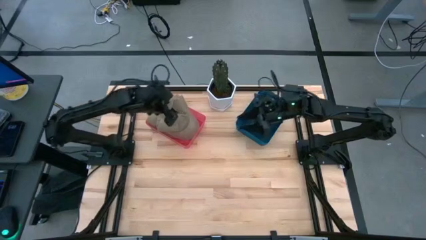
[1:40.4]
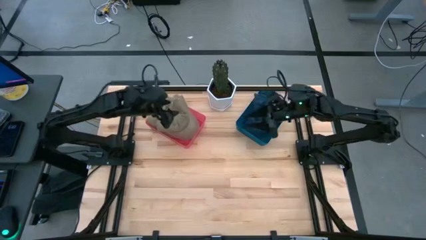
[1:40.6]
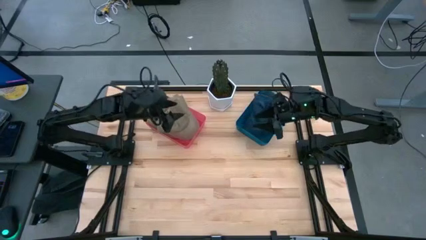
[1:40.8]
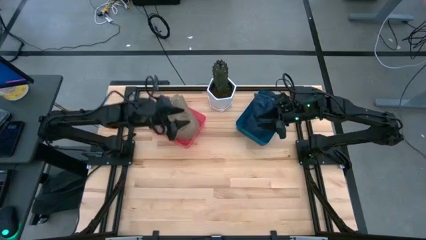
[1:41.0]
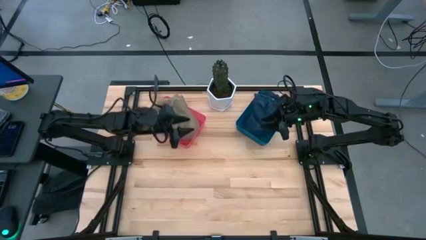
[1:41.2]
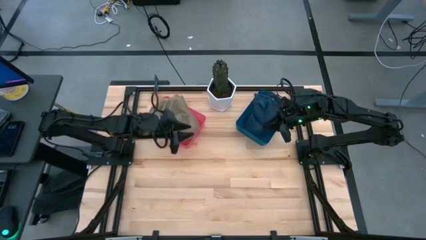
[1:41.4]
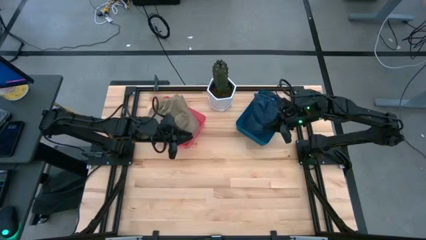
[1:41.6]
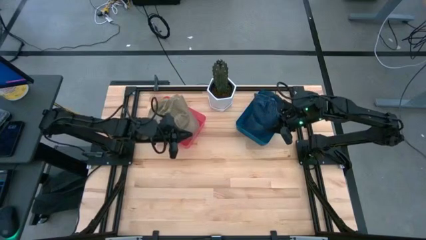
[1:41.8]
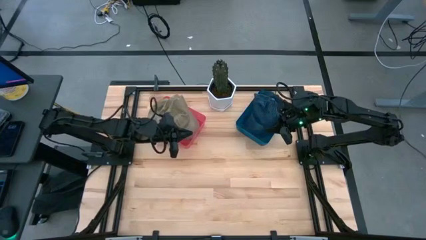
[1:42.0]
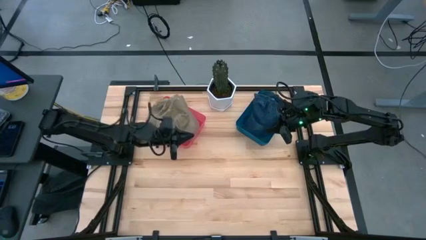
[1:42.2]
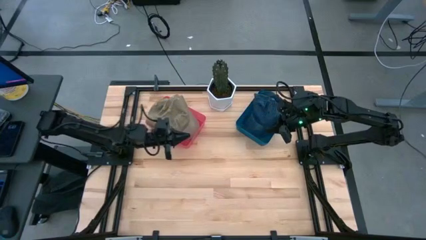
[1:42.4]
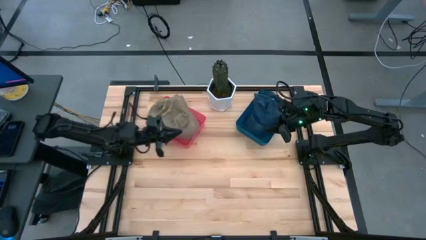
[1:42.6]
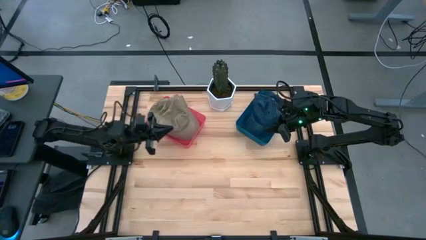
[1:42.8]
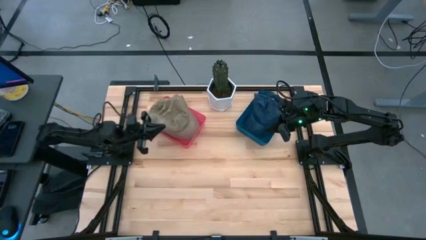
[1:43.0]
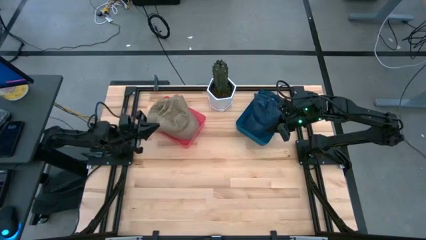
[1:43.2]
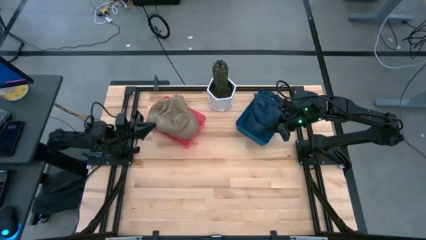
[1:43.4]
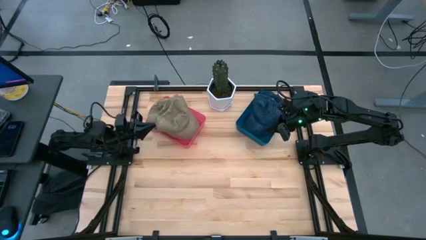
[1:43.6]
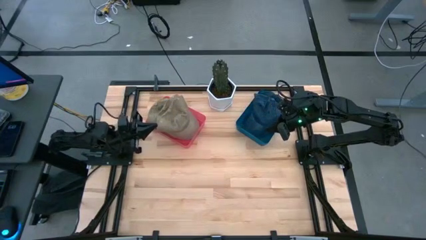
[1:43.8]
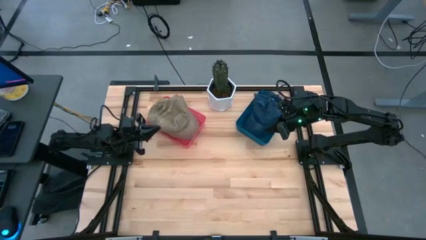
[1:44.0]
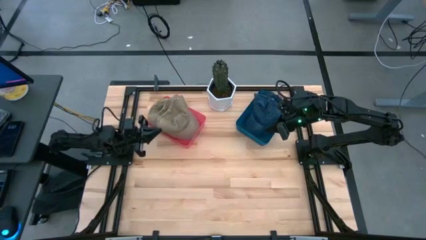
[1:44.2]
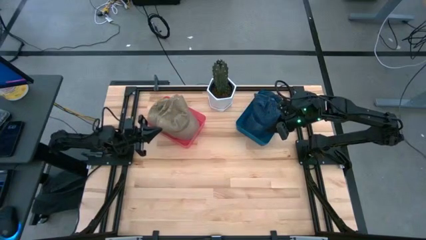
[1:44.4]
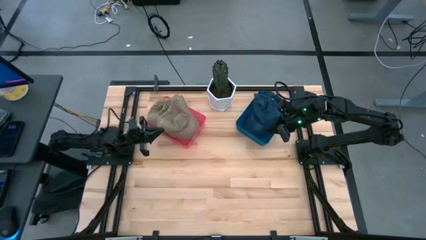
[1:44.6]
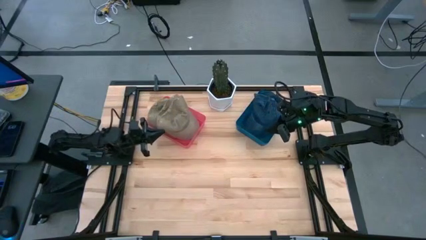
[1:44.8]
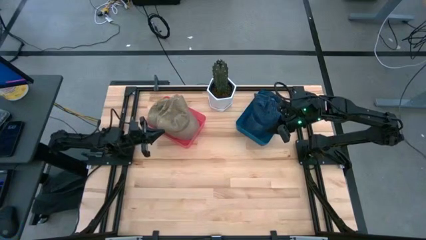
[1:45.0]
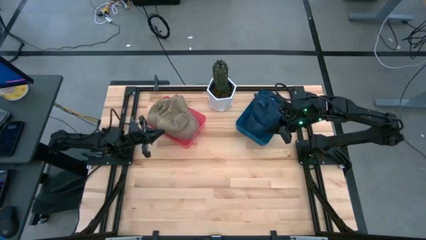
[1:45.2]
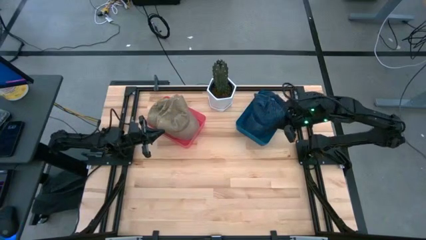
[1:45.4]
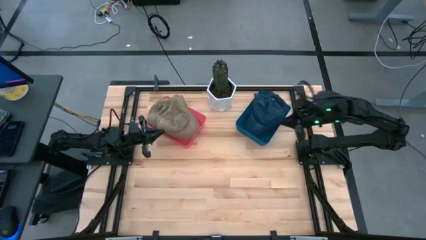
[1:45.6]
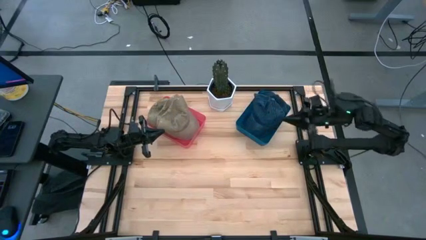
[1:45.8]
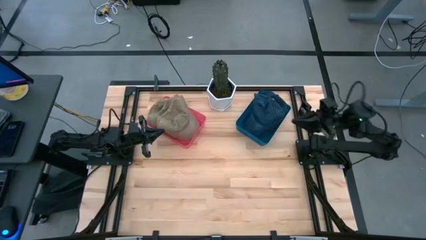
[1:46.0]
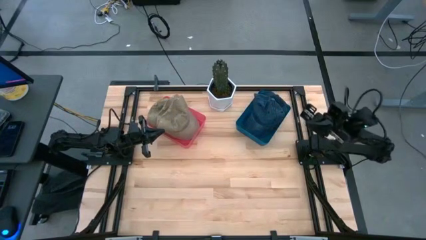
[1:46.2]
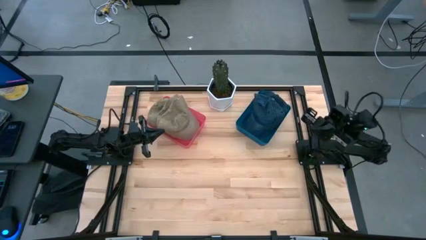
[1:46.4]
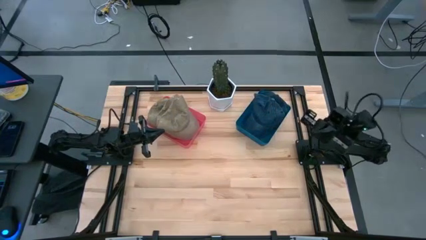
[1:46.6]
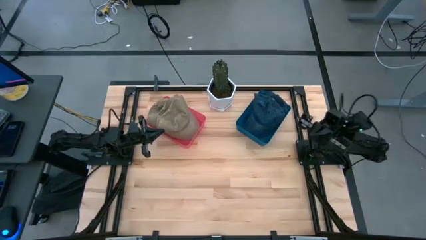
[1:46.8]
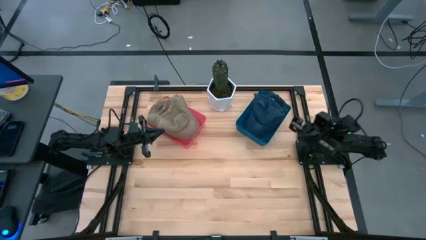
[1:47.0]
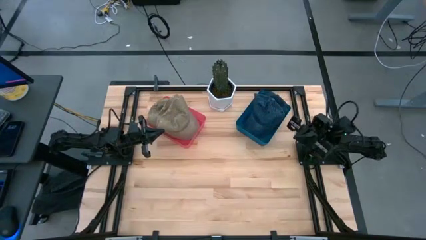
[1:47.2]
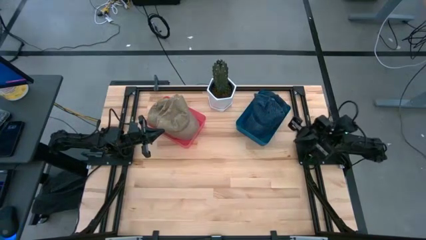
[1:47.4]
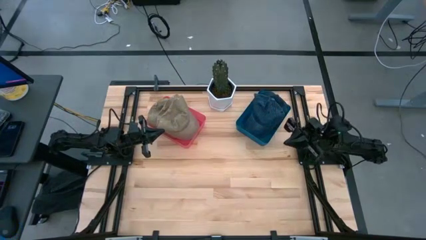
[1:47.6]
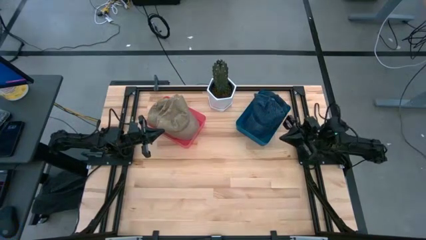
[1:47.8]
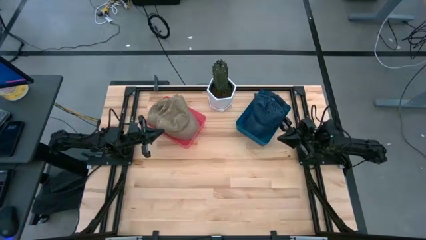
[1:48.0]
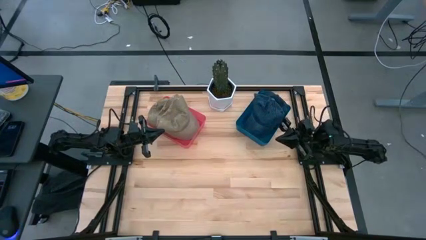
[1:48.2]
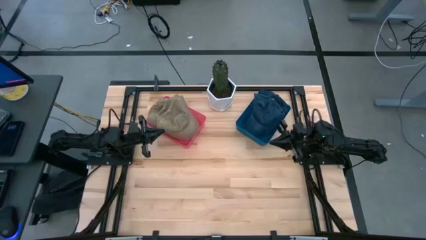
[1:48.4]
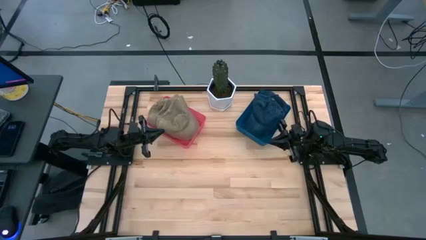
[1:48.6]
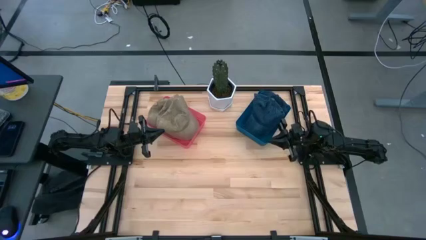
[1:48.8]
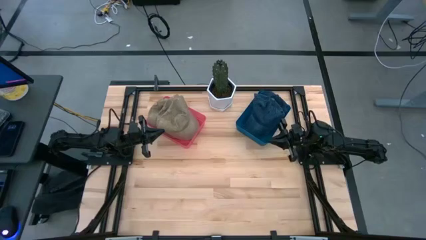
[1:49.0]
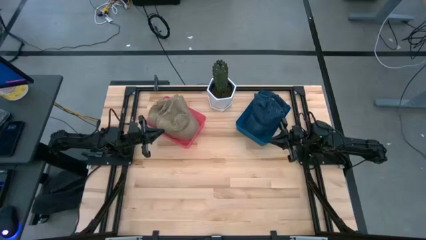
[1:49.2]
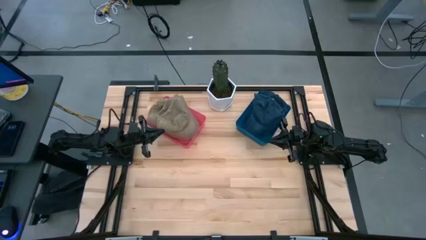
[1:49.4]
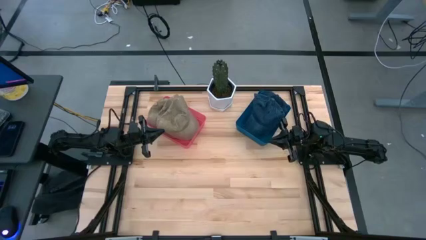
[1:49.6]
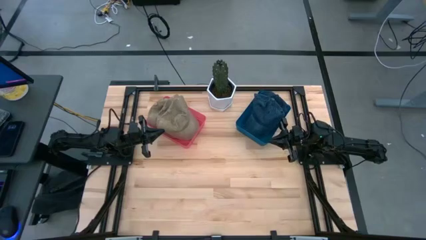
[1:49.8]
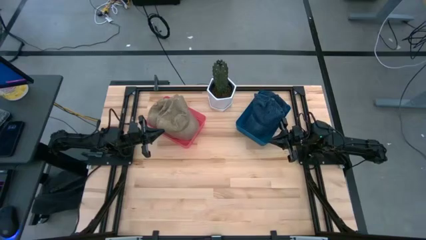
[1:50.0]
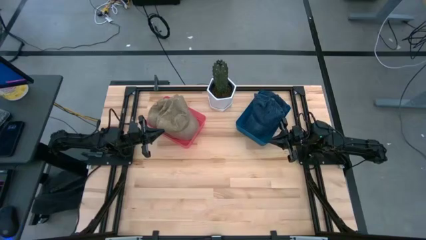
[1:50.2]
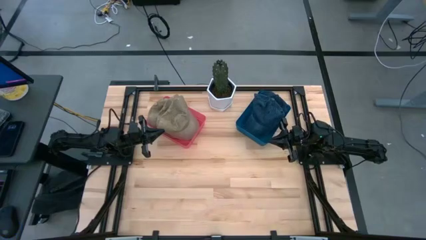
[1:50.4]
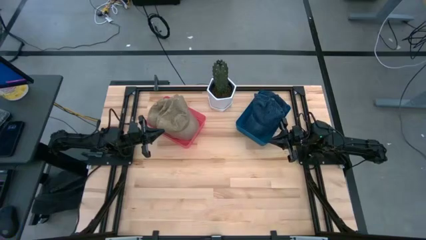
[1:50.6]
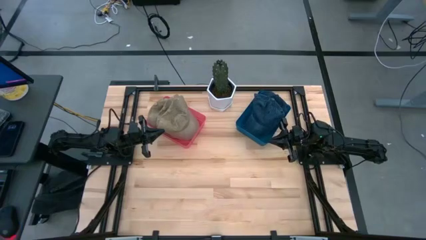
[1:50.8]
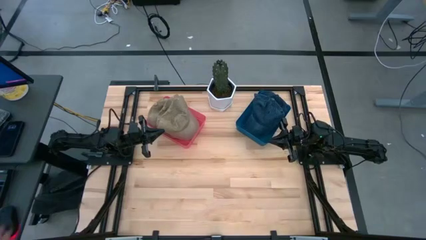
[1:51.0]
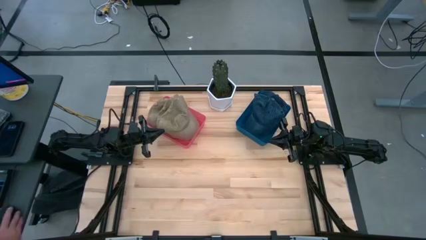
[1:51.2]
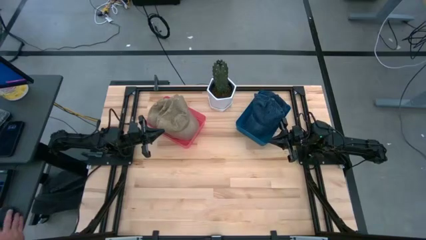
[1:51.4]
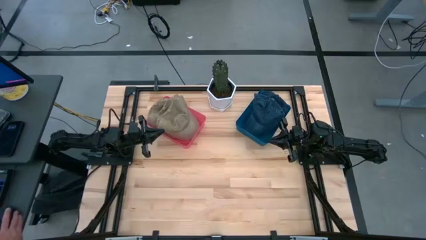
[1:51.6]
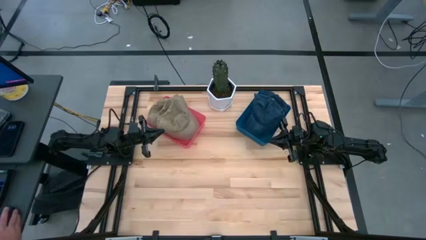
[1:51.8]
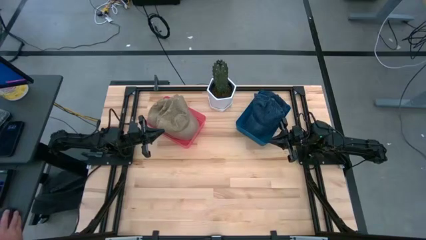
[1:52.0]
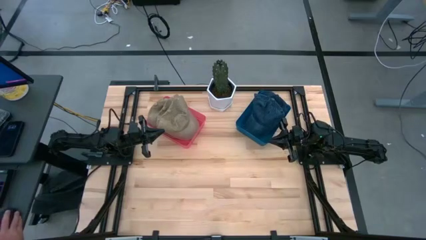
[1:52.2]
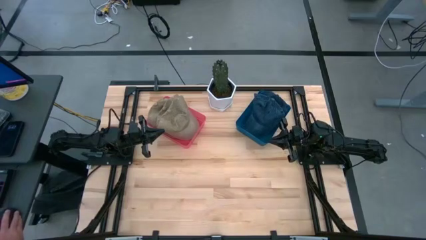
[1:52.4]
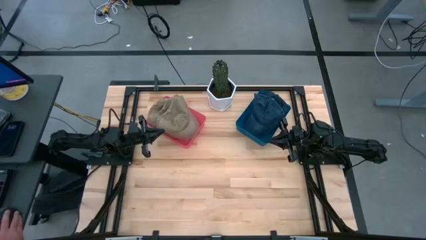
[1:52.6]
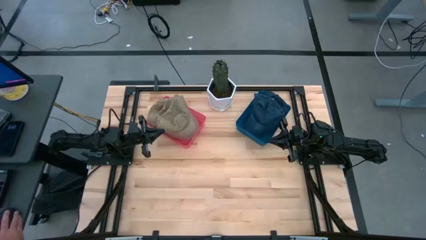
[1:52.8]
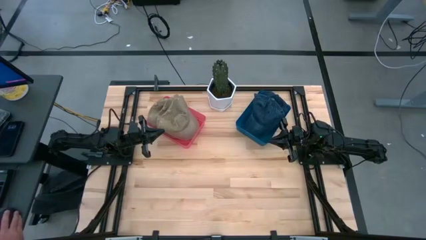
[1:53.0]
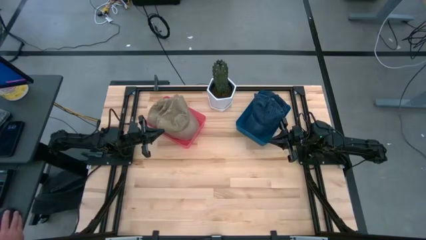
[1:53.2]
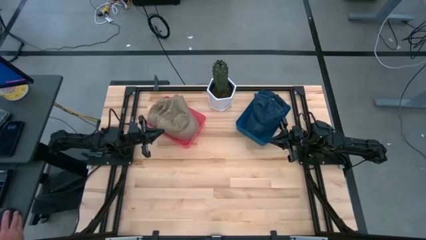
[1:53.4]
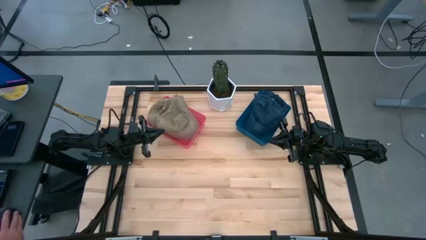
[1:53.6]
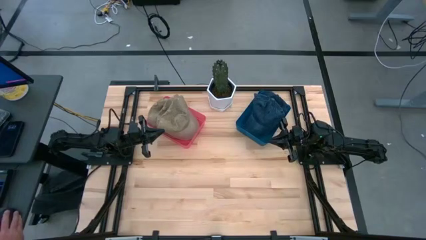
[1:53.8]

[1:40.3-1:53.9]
Task: Pick & Place hat
Return to Home Position
